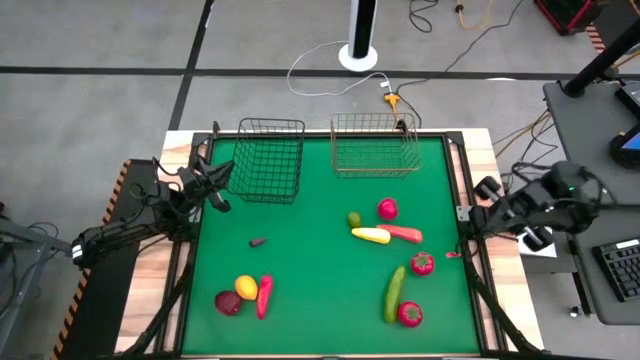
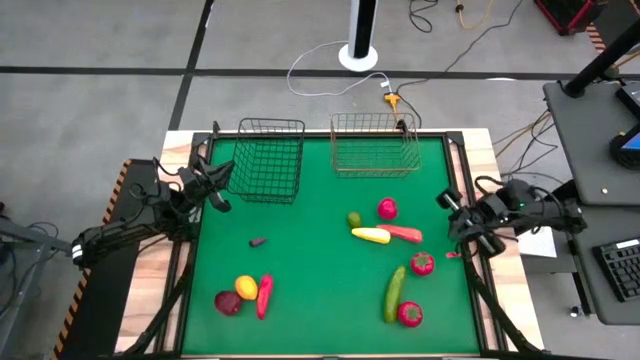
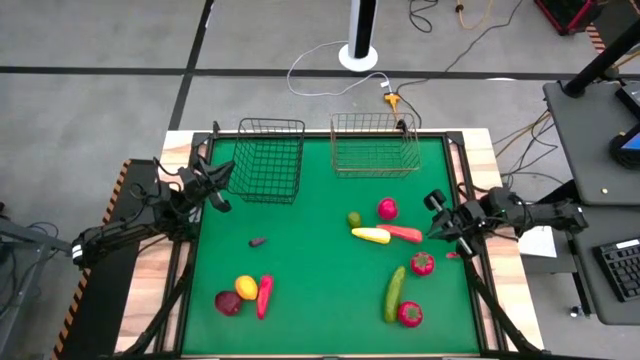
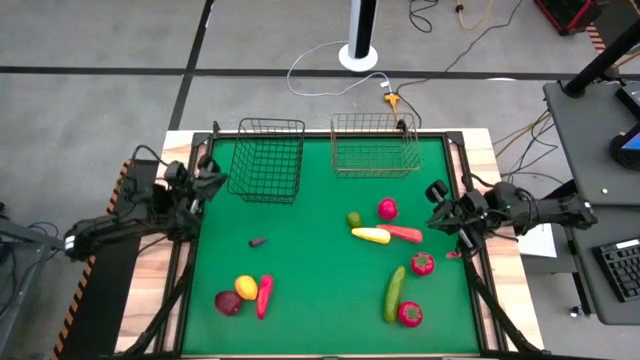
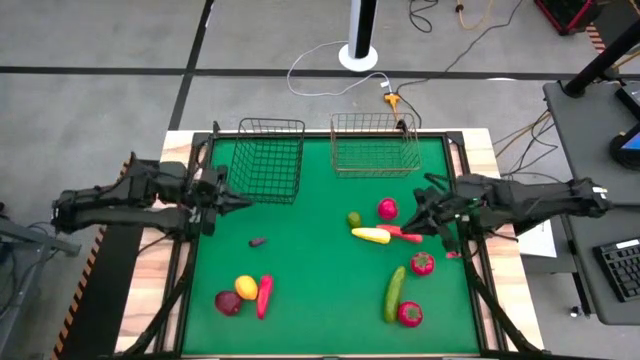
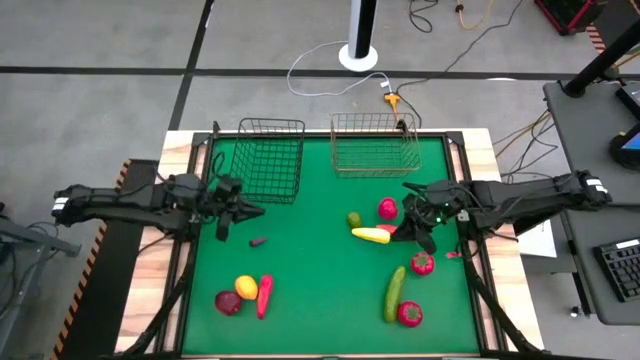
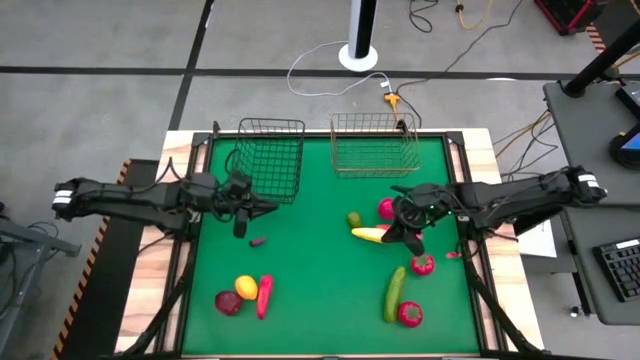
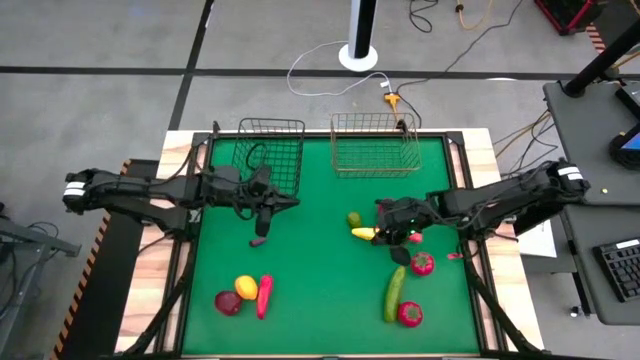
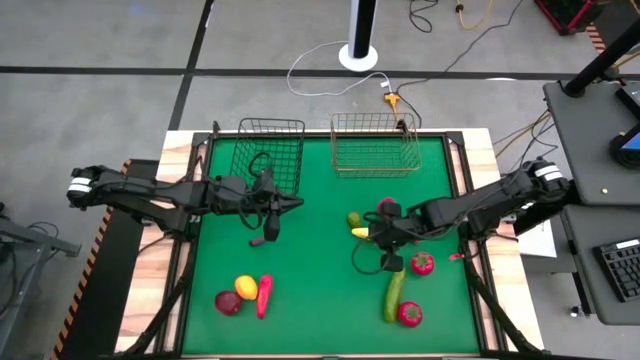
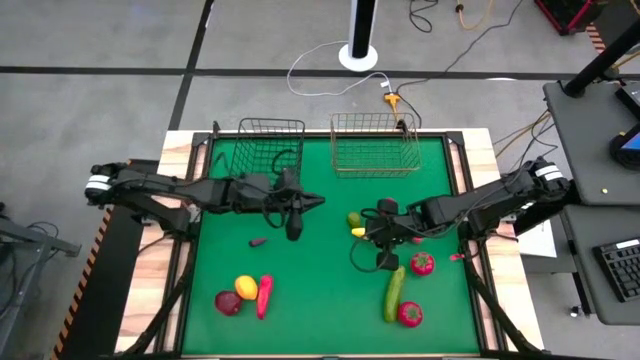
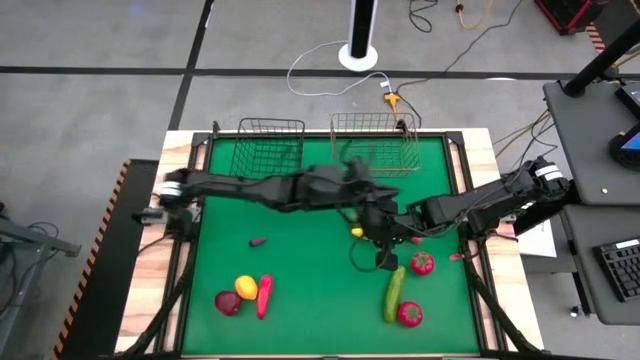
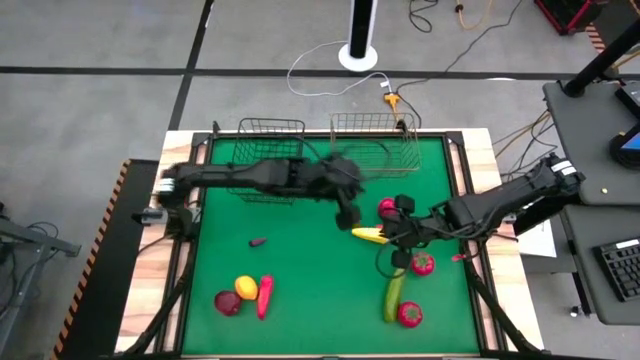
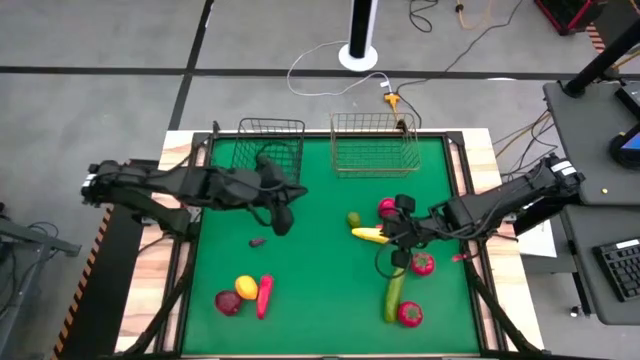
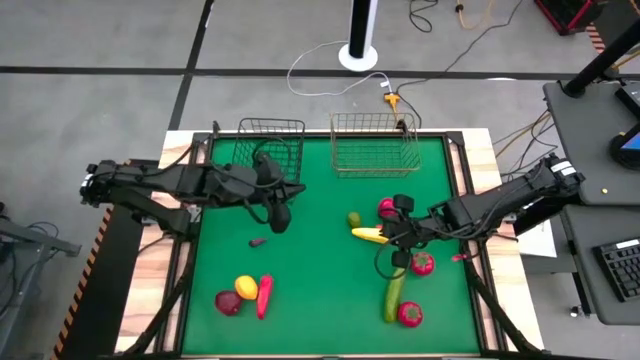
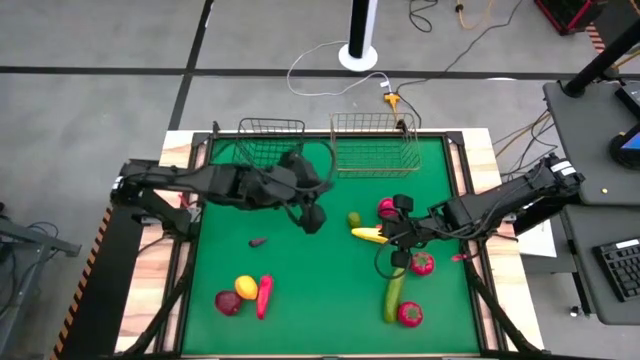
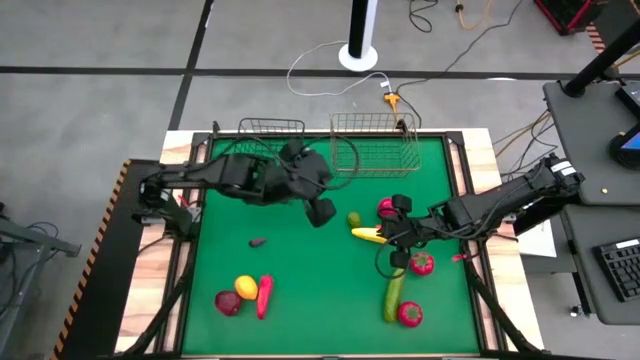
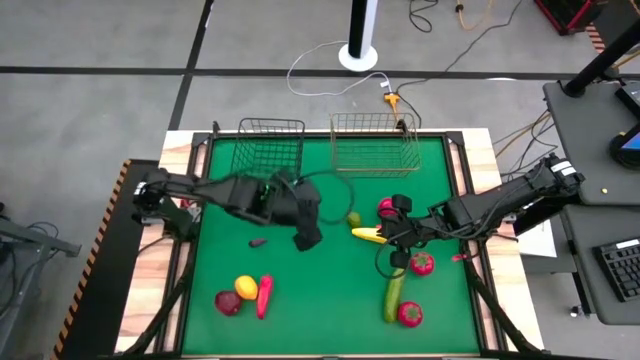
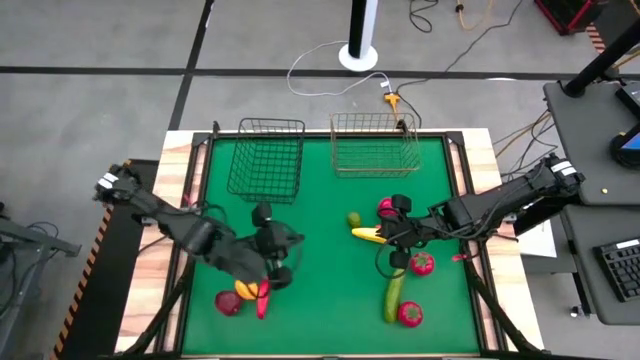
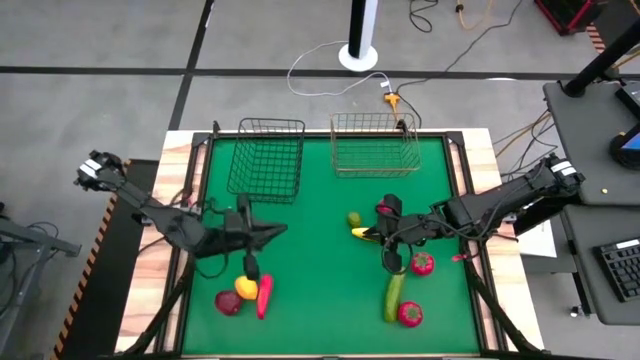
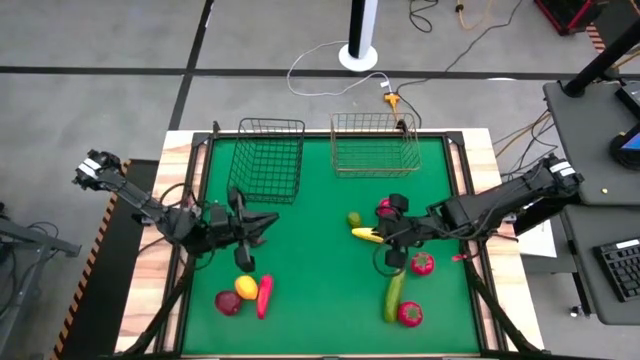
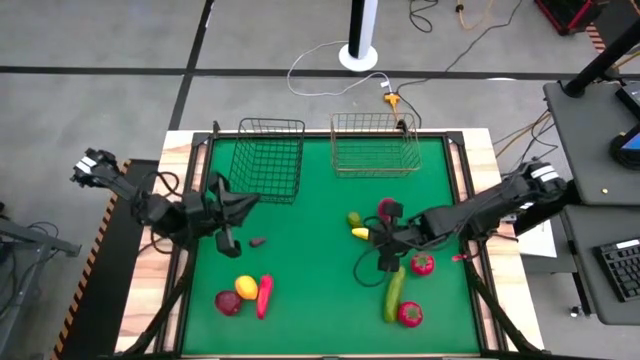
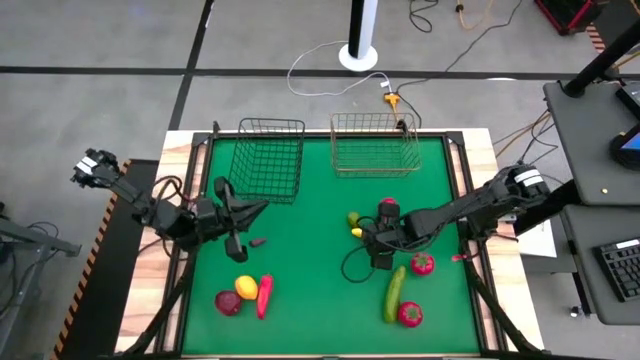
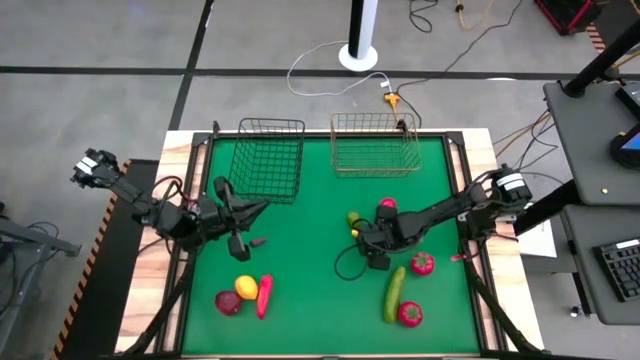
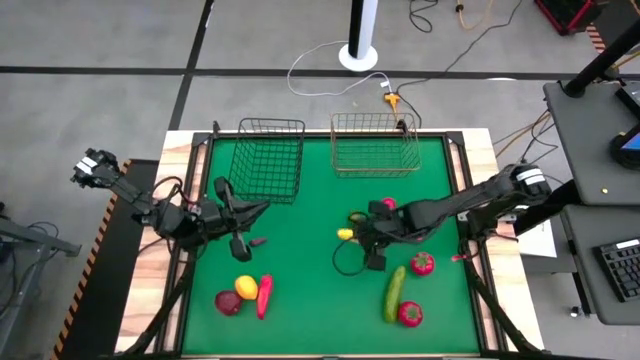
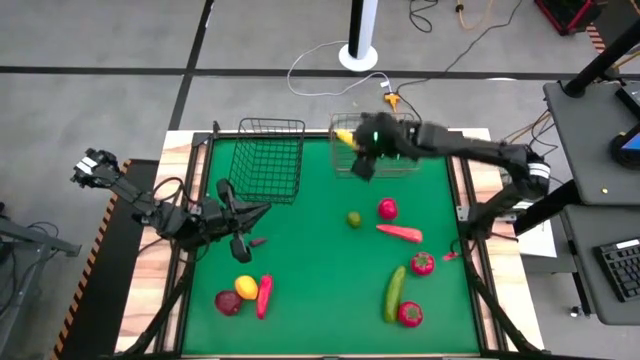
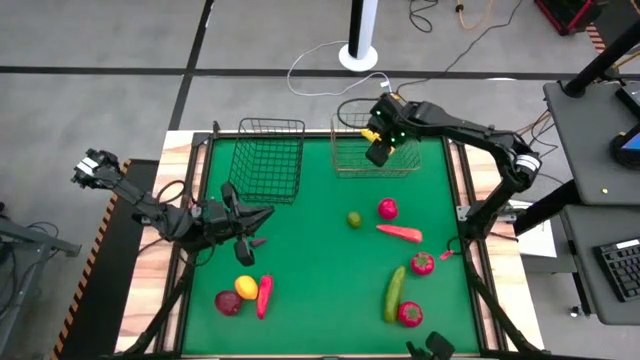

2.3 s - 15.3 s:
Task: Sort produce into baskets
Put the corn into the gold wire basket
